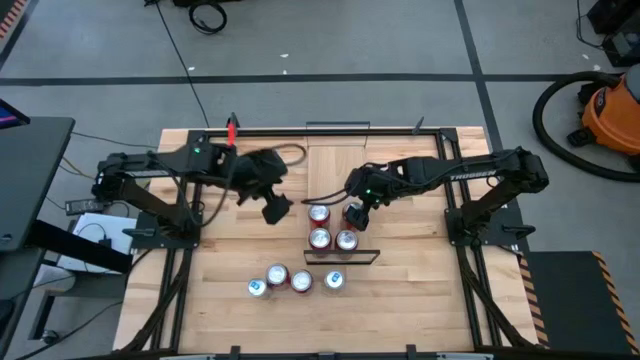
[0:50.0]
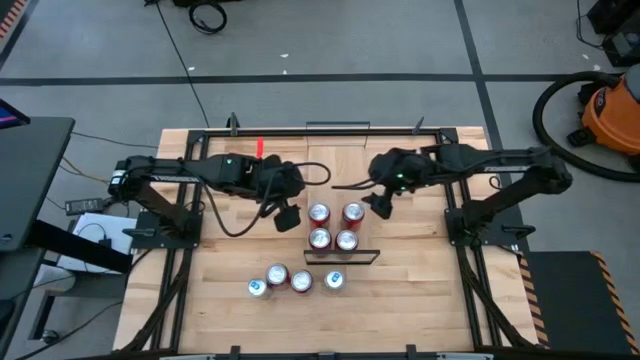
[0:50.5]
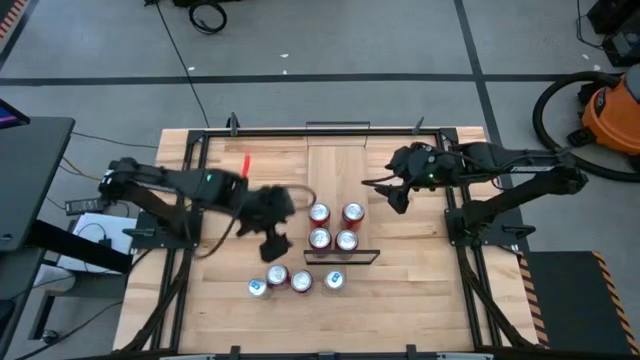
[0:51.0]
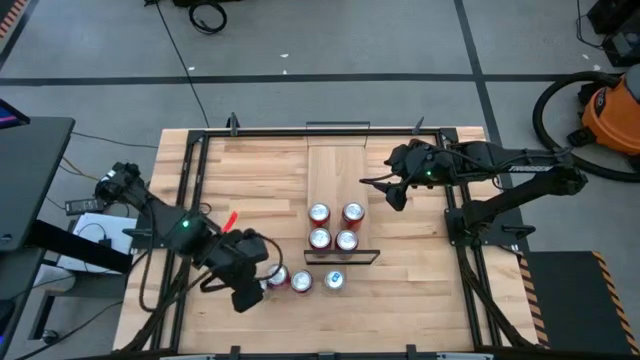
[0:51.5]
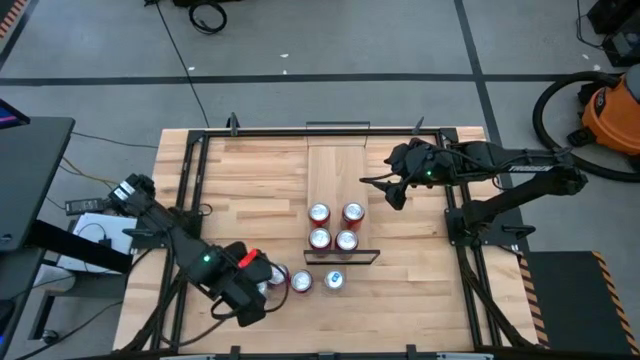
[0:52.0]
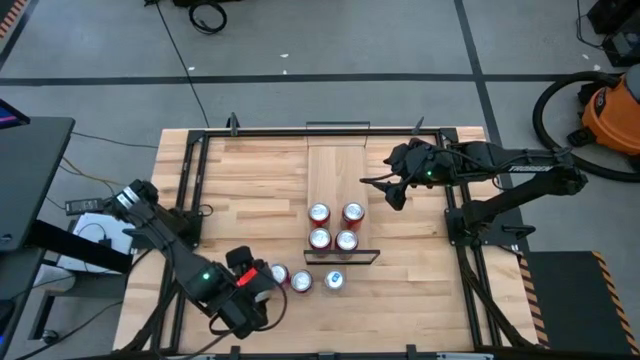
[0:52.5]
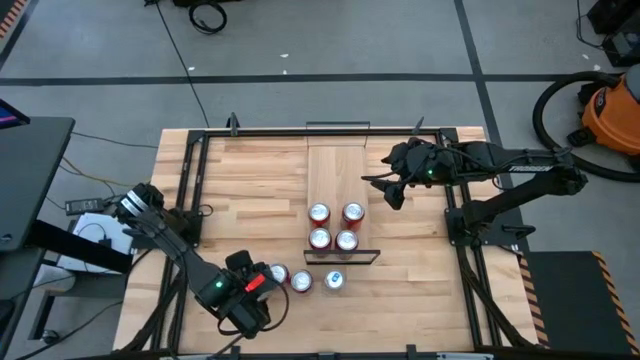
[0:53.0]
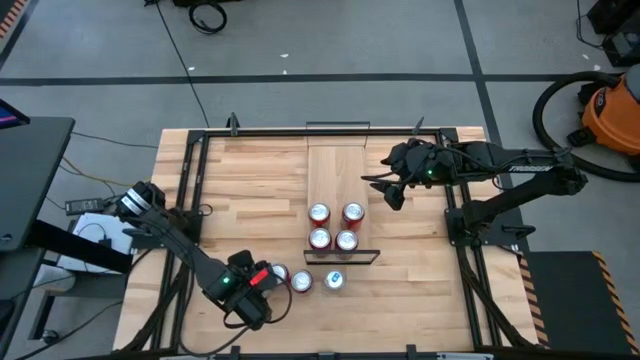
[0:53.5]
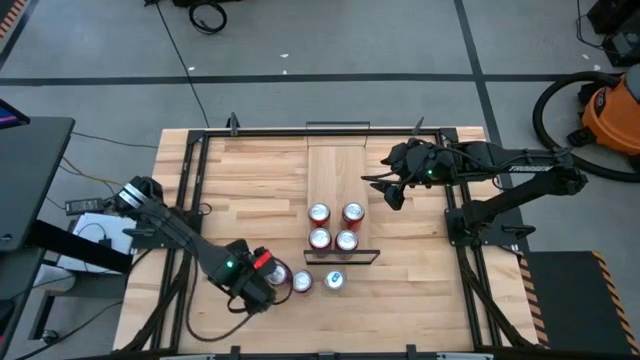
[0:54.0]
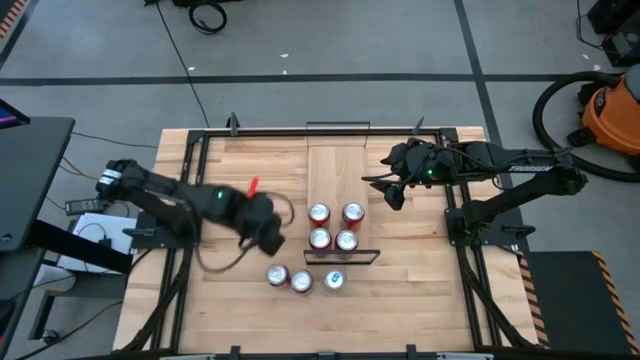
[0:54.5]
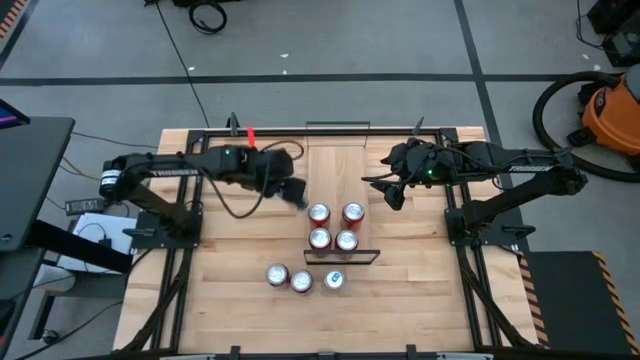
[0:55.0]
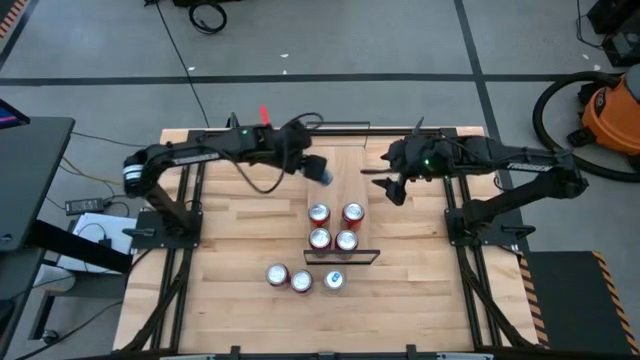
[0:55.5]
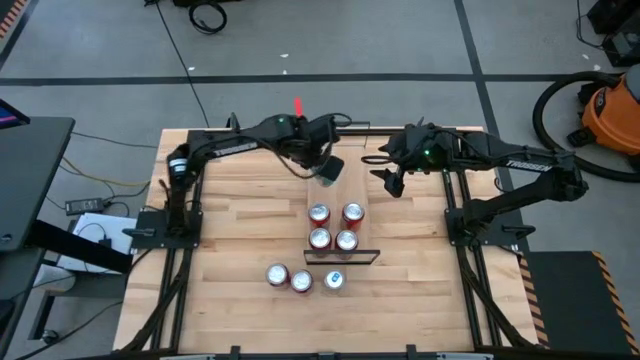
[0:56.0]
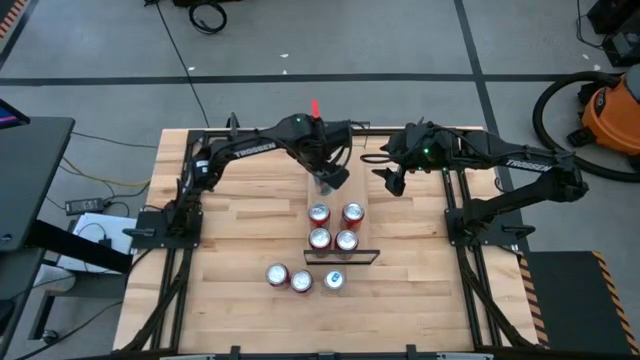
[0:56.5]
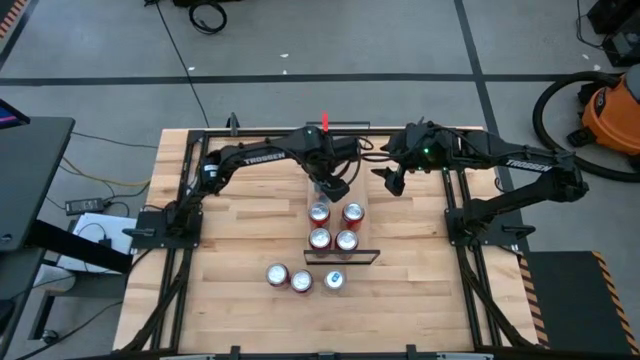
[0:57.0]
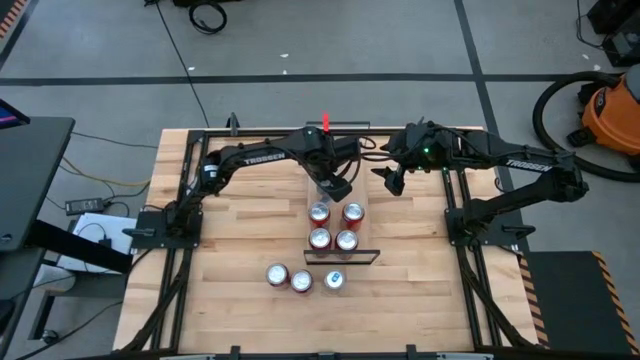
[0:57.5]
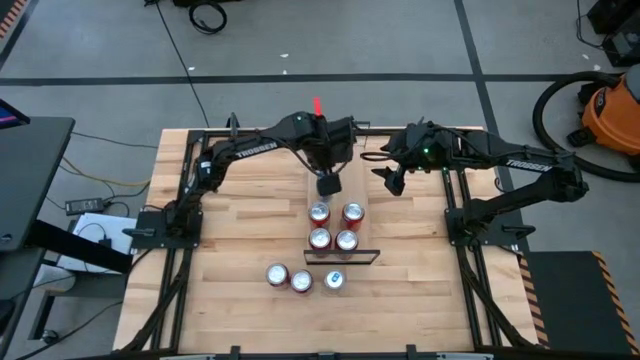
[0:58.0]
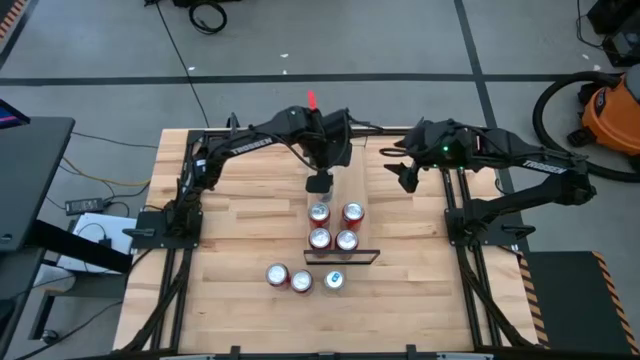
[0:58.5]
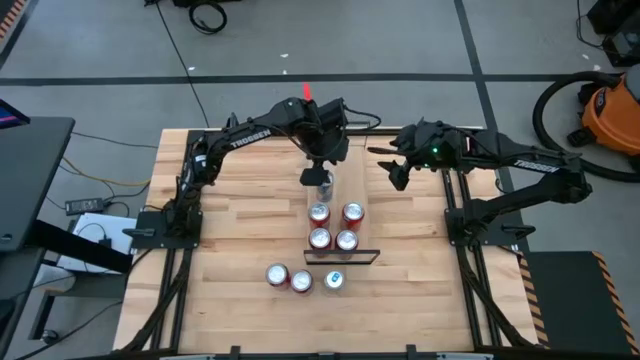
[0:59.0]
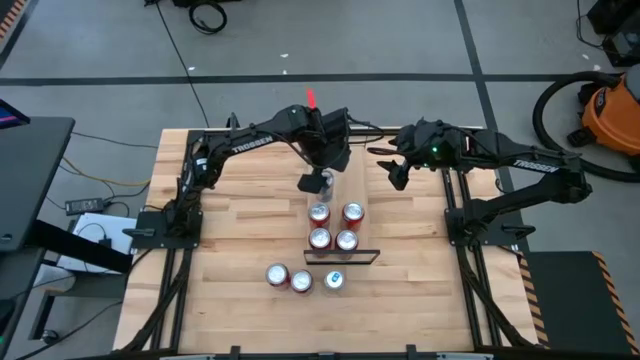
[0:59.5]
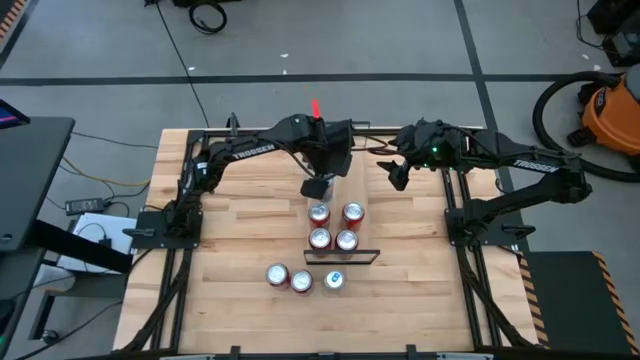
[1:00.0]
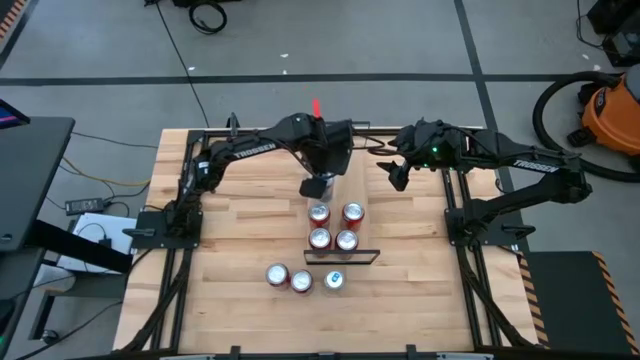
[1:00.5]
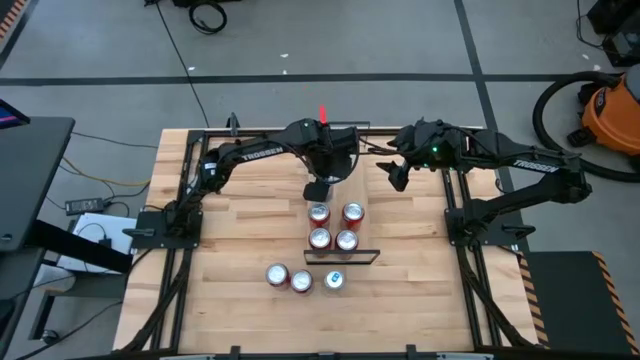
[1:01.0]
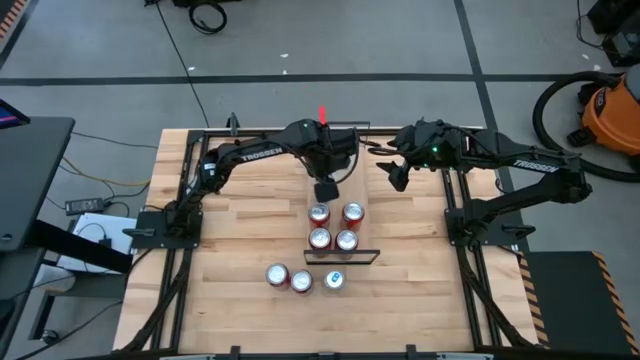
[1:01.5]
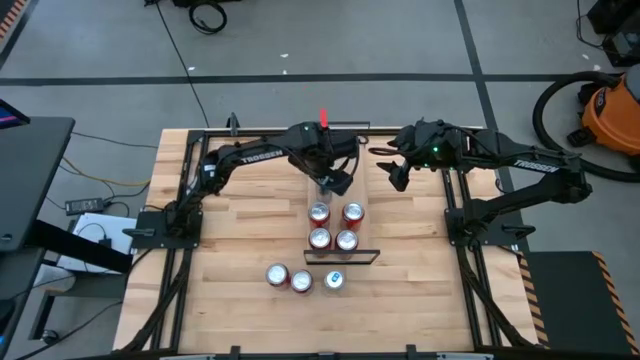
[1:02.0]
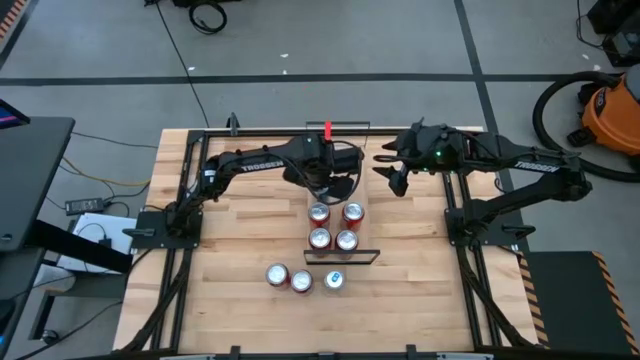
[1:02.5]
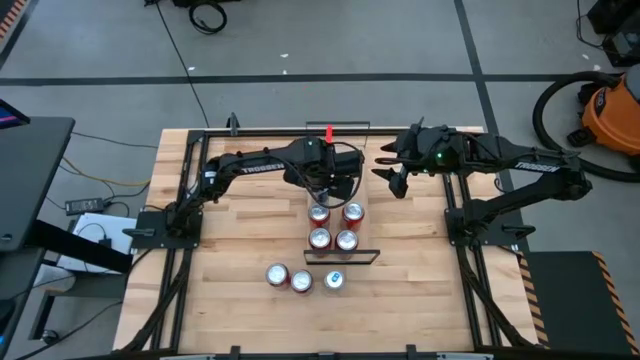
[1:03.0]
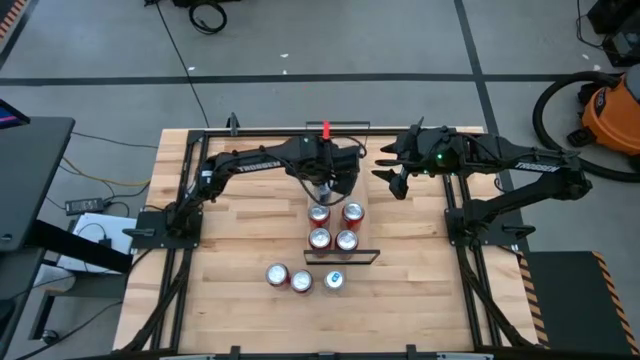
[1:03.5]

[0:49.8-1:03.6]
Task: Place canned beverage on shelf
Put the left blue soda can on the shelf

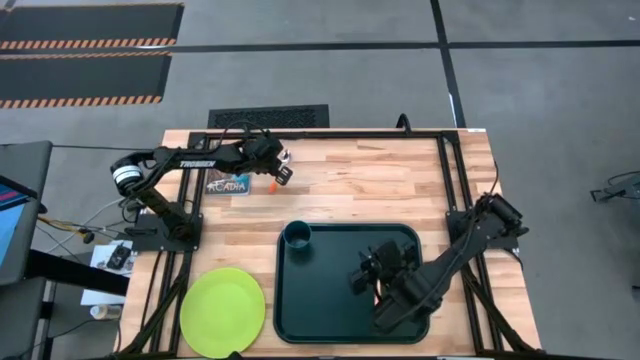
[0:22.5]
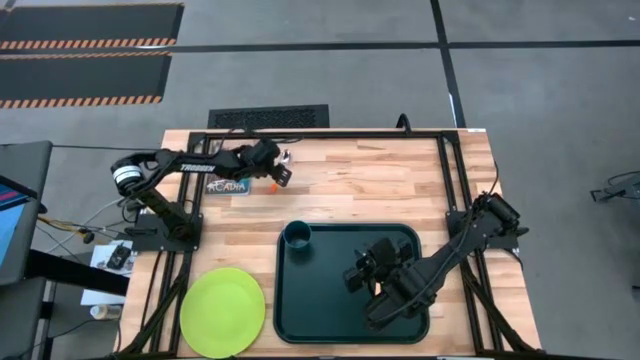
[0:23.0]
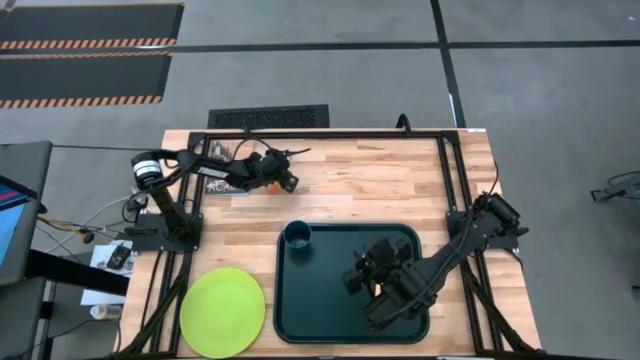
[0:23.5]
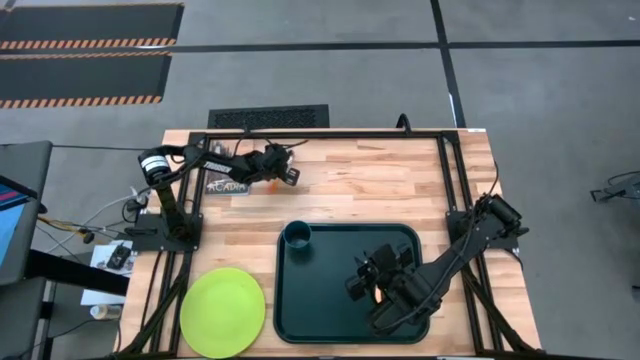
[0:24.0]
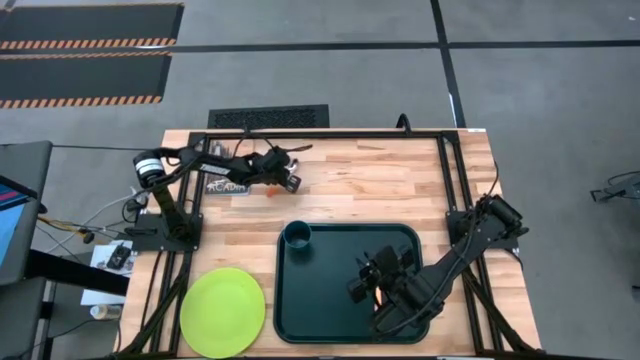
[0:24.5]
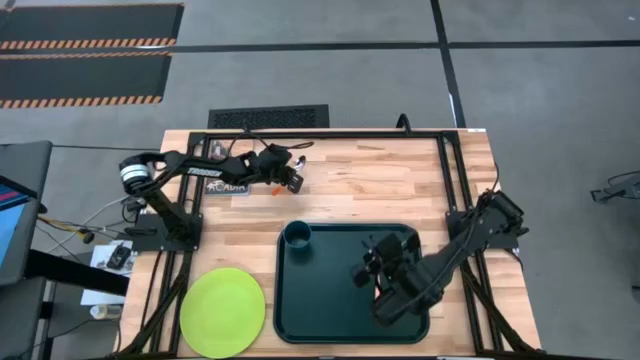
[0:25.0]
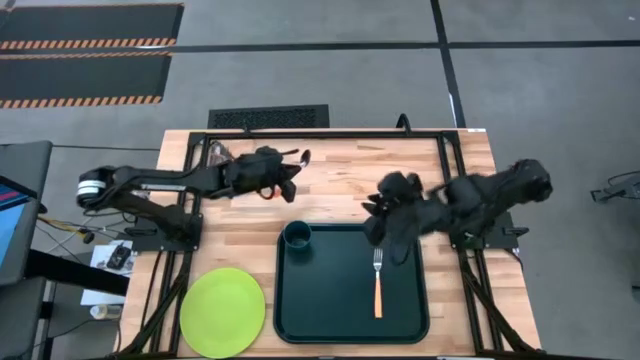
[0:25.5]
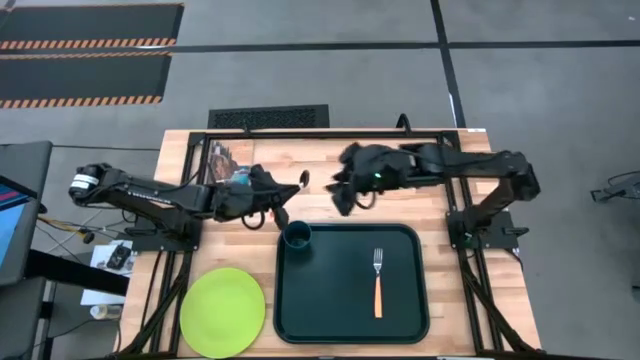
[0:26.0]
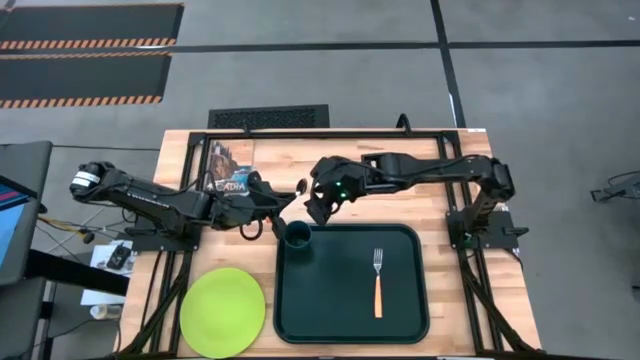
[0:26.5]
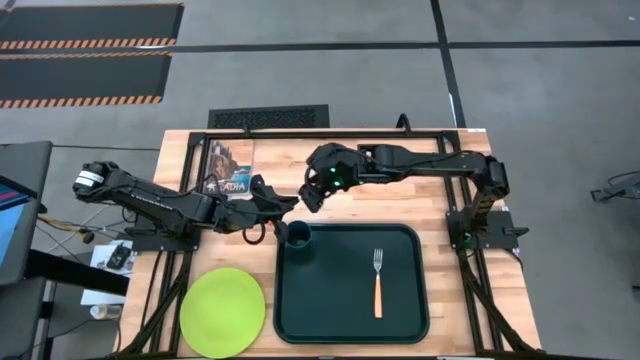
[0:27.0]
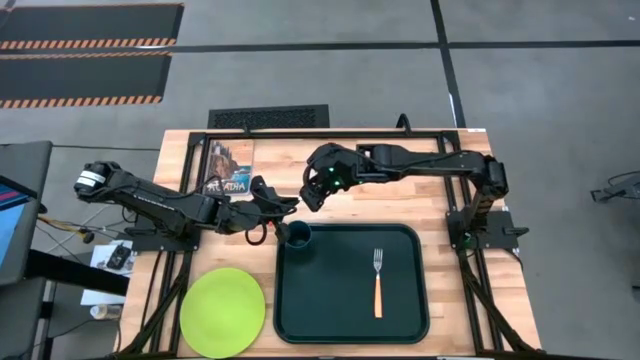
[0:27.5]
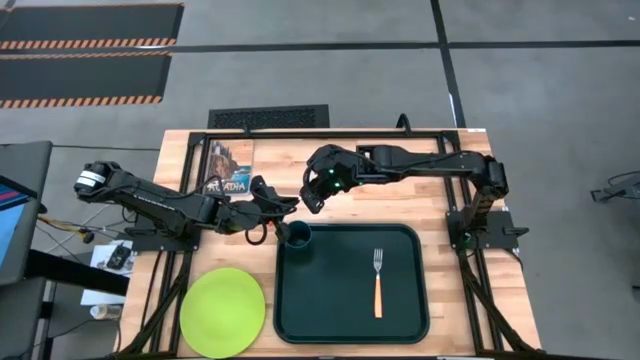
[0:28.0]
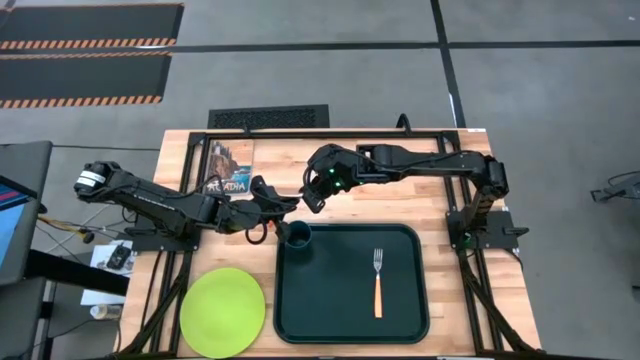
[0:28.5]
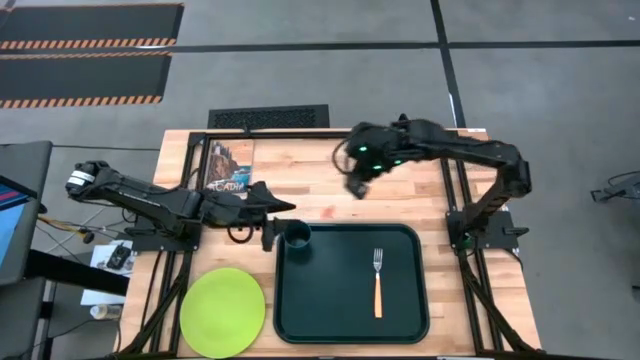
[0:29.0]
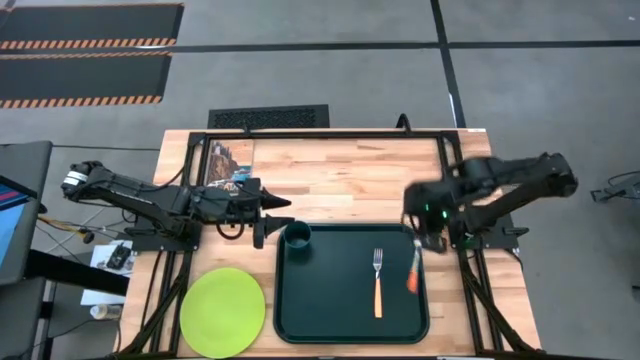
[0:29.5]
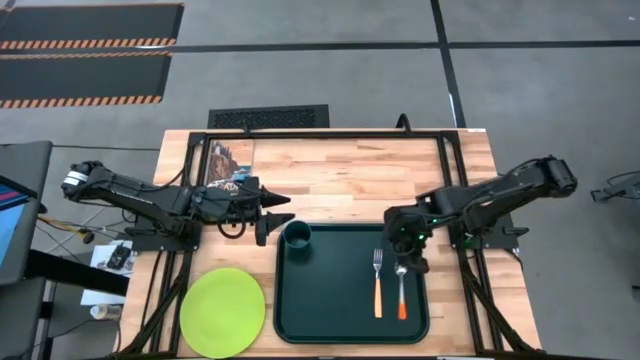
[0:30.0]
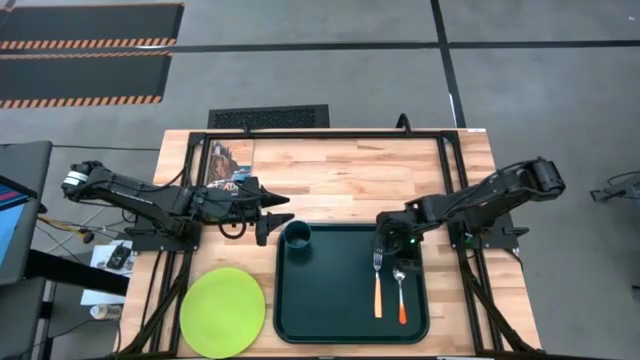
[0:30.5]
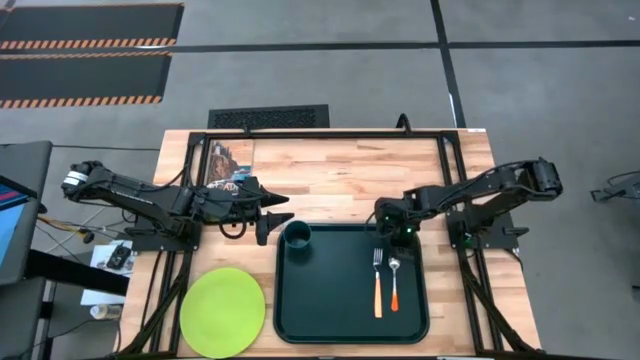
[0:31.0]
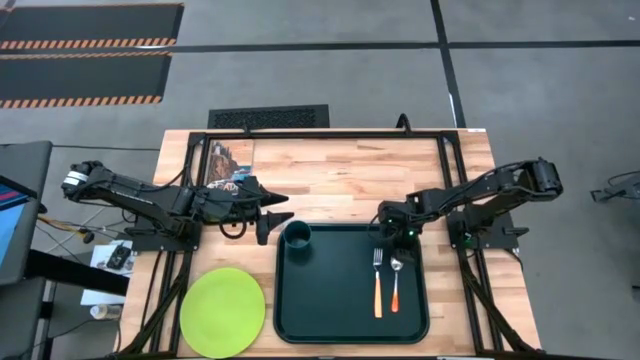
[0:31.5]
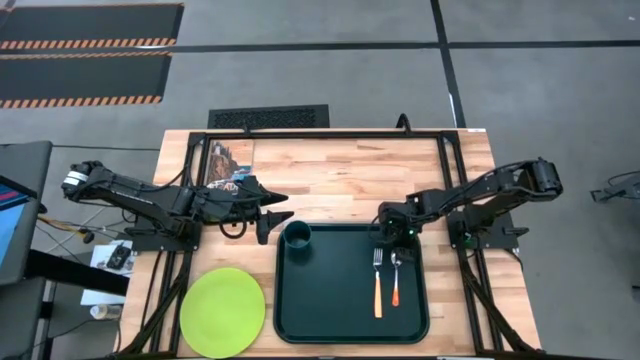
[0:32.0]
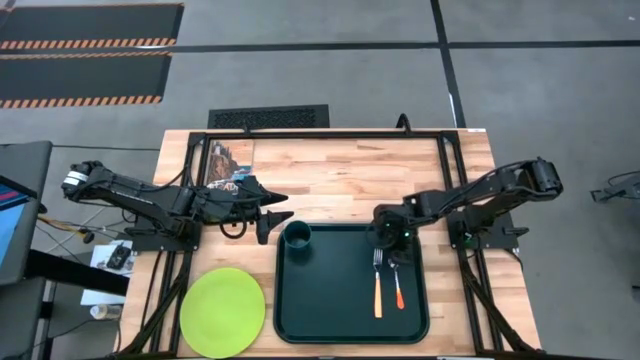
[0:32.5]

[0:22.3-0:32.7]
Task: Pick and place plate/cup/fork/spoon on tray
Put the orange spoon on the black tray to the right of the light orange fork
